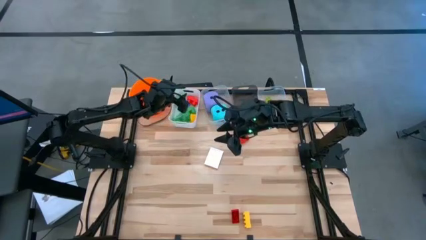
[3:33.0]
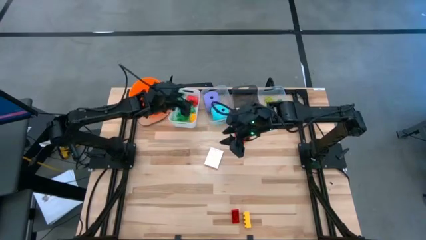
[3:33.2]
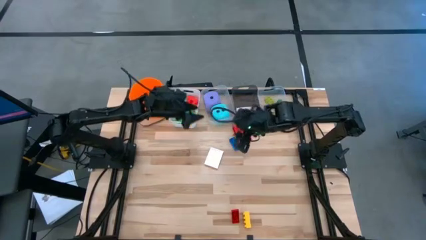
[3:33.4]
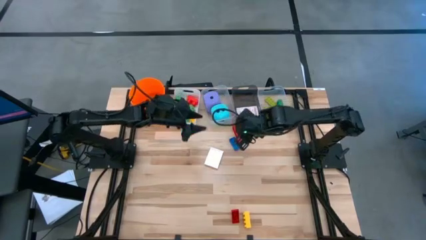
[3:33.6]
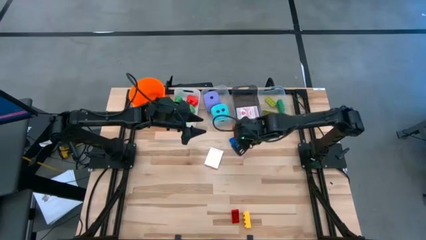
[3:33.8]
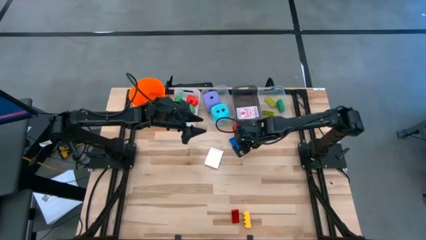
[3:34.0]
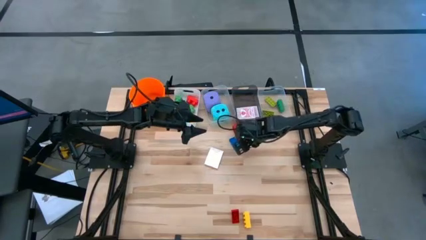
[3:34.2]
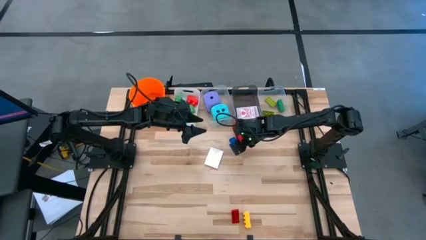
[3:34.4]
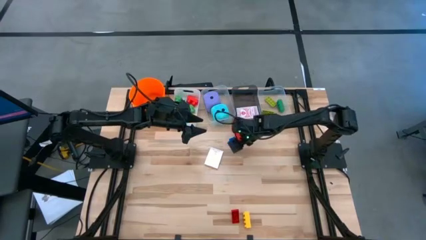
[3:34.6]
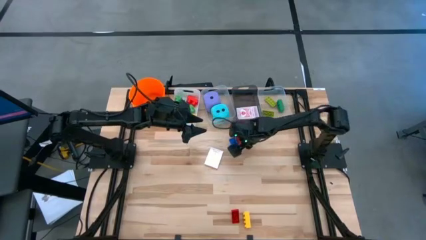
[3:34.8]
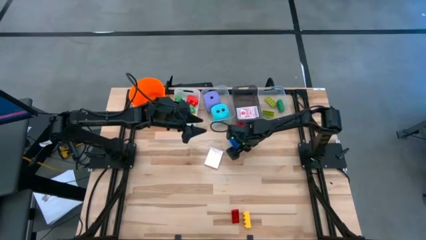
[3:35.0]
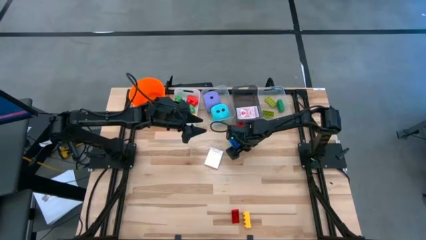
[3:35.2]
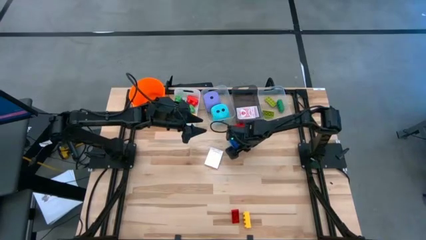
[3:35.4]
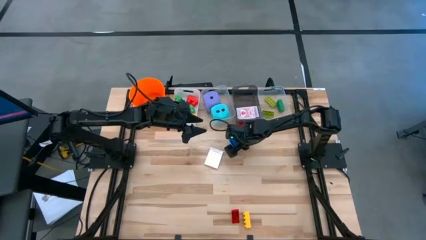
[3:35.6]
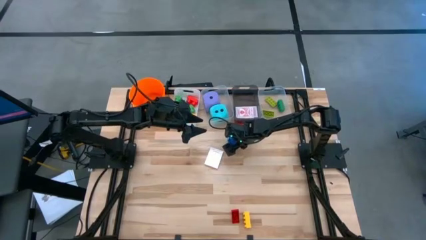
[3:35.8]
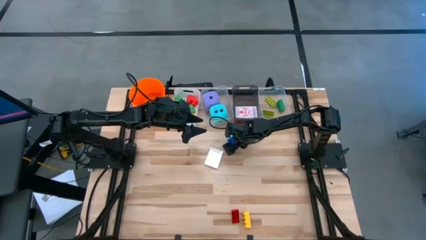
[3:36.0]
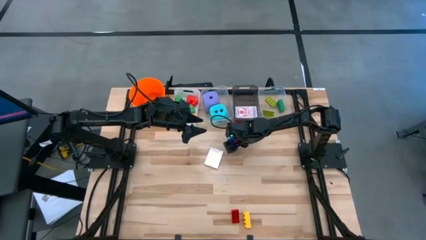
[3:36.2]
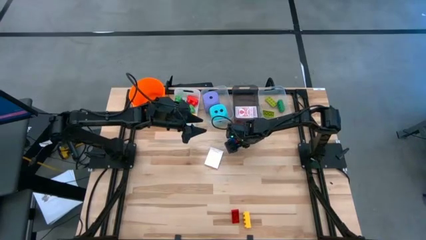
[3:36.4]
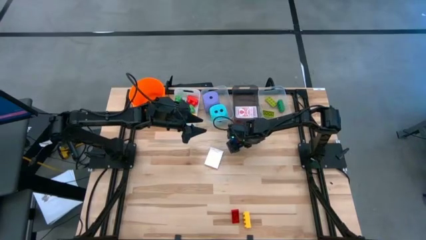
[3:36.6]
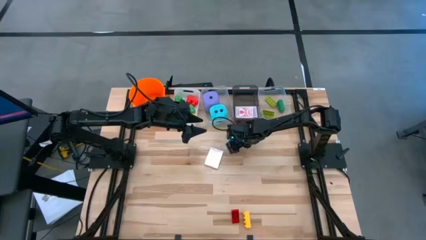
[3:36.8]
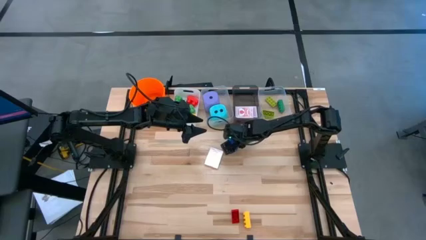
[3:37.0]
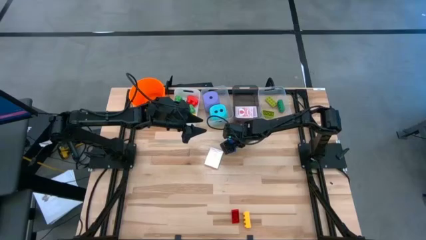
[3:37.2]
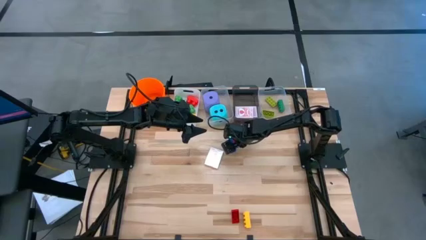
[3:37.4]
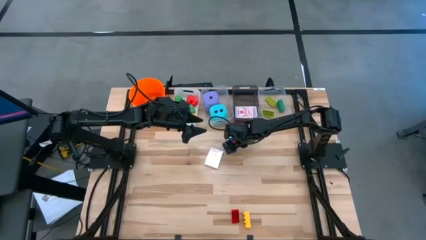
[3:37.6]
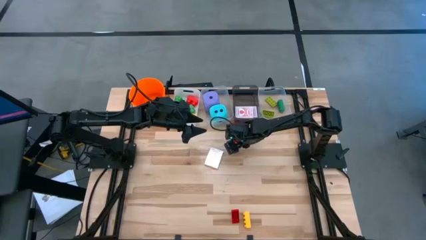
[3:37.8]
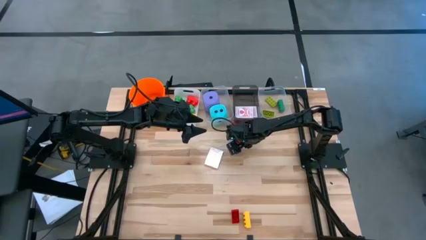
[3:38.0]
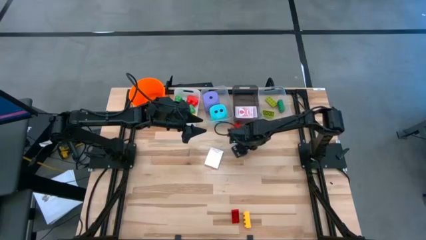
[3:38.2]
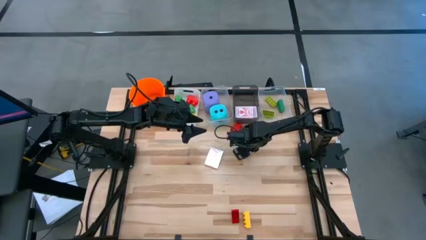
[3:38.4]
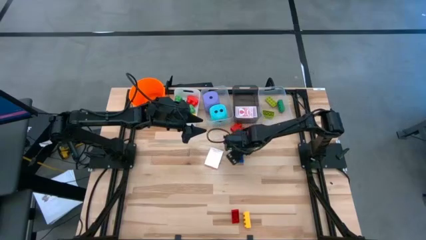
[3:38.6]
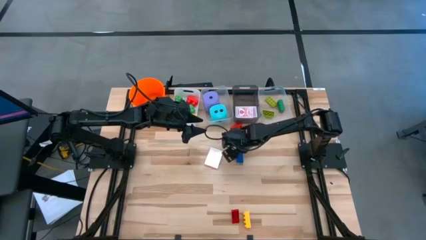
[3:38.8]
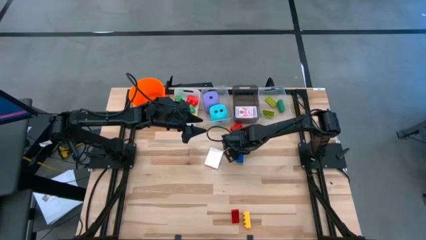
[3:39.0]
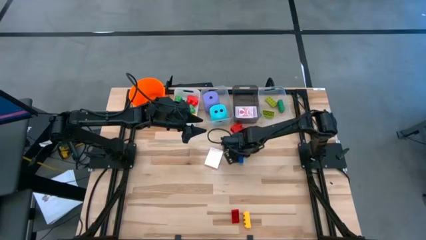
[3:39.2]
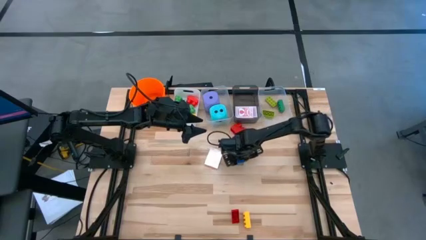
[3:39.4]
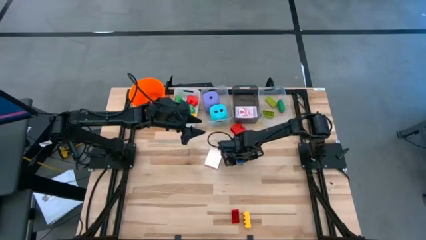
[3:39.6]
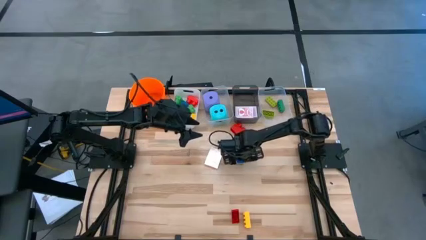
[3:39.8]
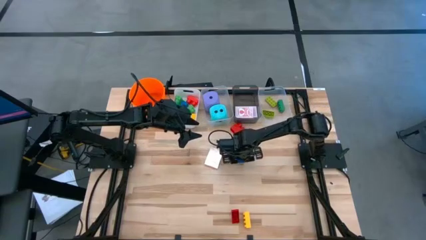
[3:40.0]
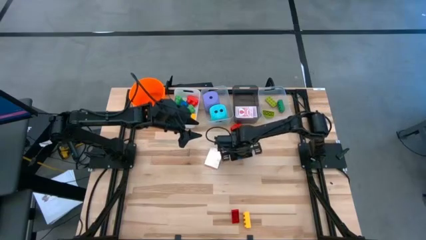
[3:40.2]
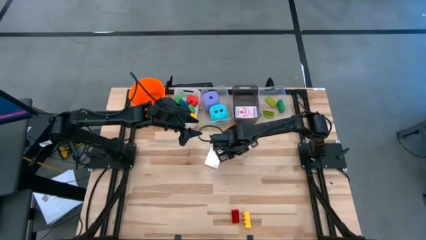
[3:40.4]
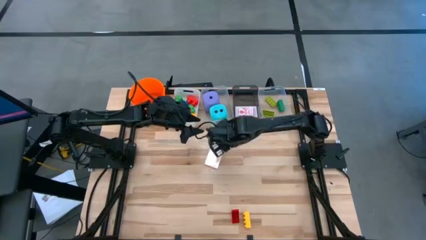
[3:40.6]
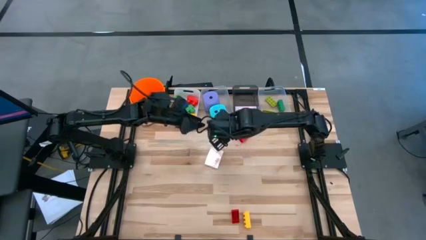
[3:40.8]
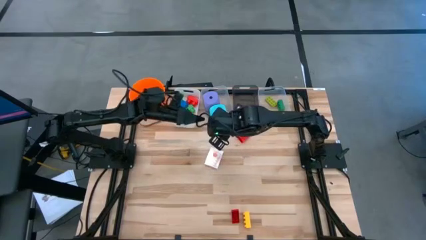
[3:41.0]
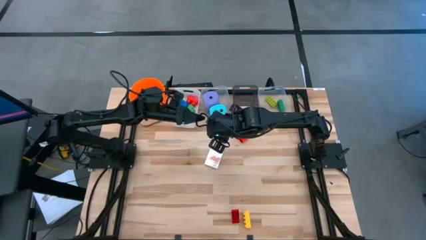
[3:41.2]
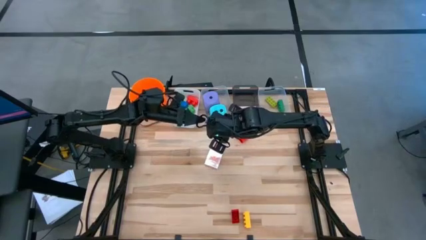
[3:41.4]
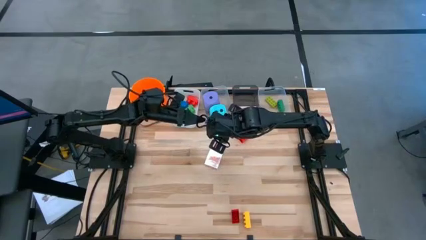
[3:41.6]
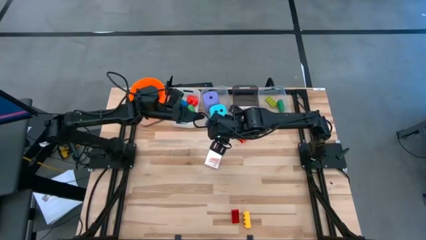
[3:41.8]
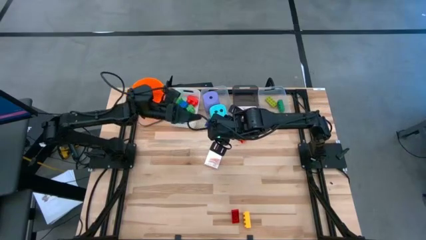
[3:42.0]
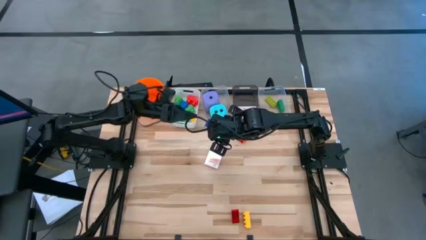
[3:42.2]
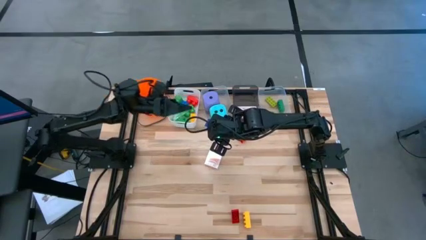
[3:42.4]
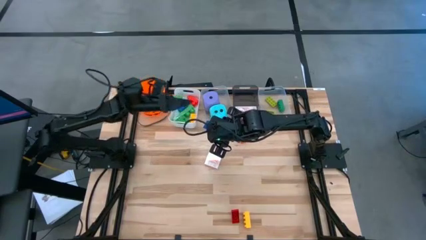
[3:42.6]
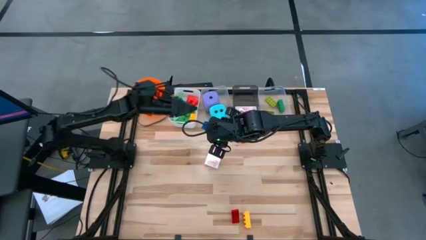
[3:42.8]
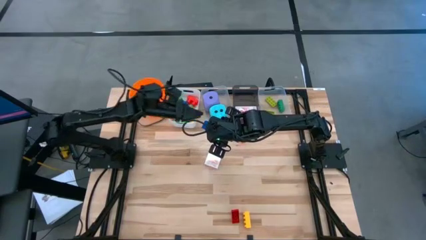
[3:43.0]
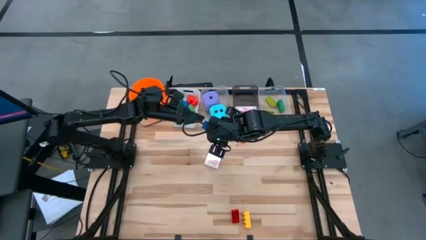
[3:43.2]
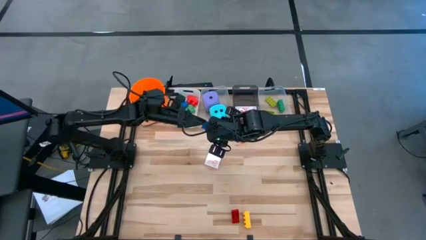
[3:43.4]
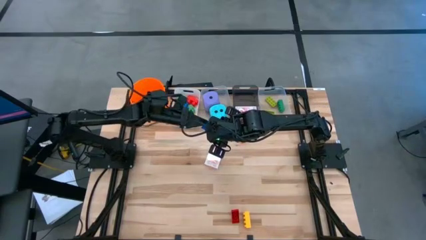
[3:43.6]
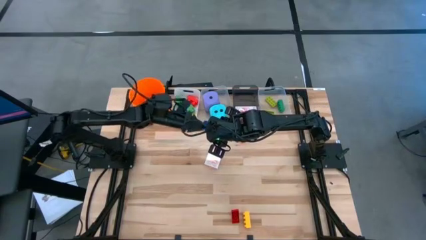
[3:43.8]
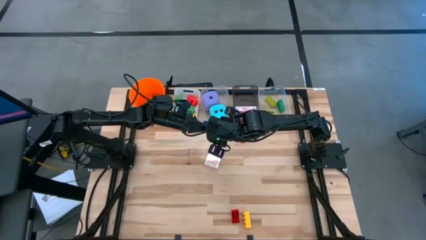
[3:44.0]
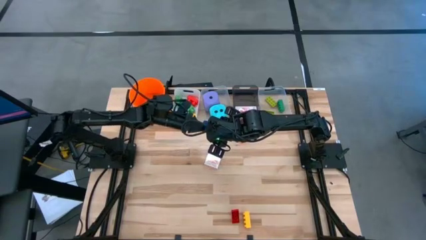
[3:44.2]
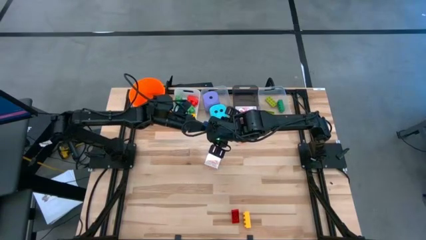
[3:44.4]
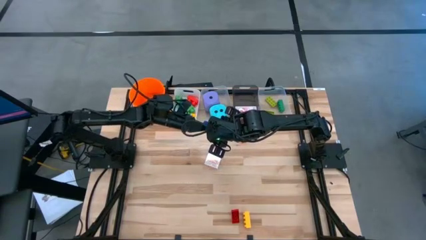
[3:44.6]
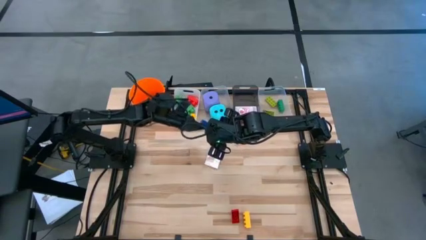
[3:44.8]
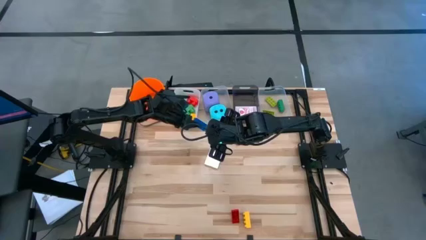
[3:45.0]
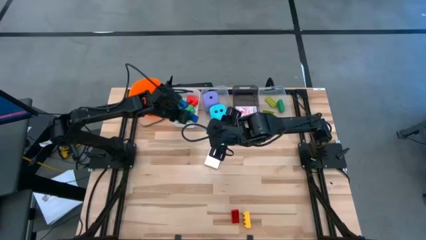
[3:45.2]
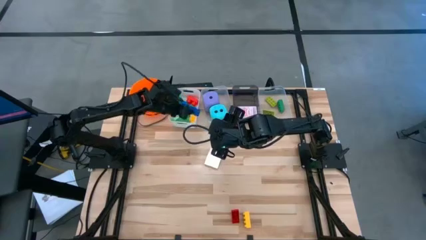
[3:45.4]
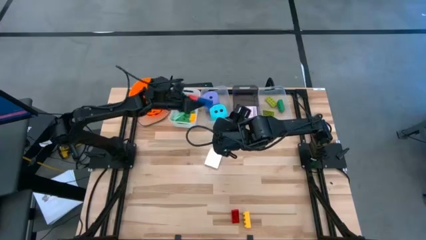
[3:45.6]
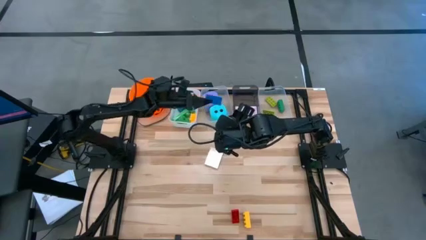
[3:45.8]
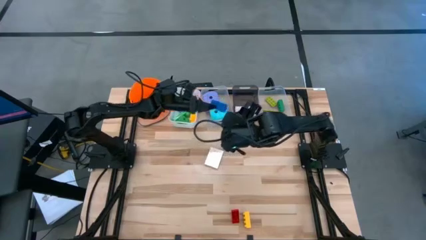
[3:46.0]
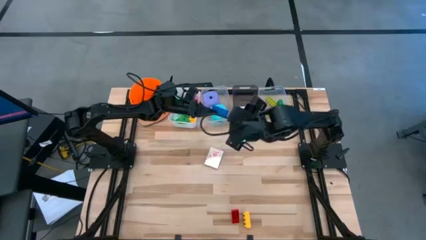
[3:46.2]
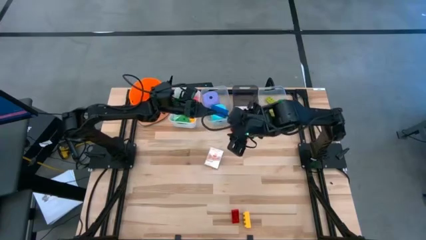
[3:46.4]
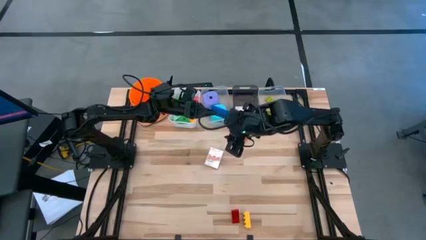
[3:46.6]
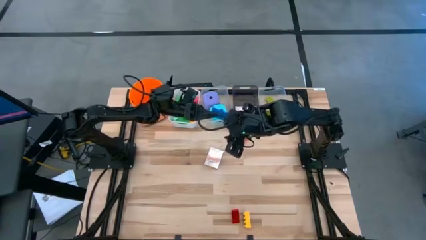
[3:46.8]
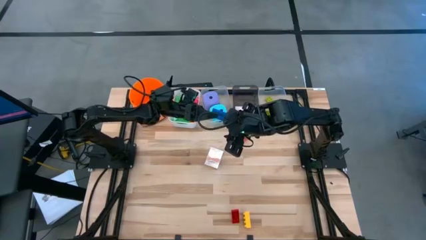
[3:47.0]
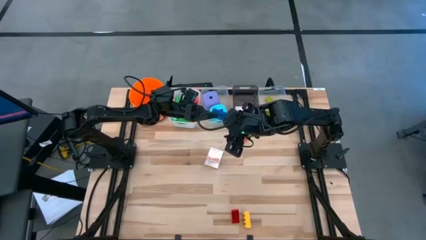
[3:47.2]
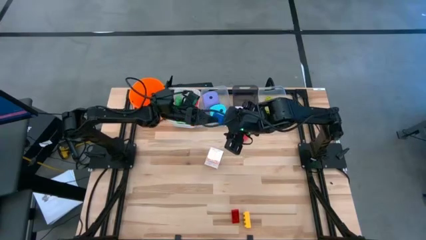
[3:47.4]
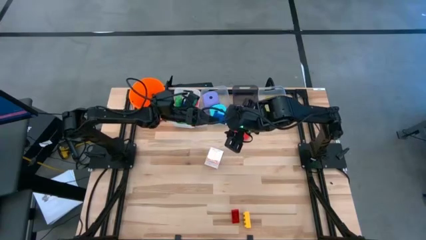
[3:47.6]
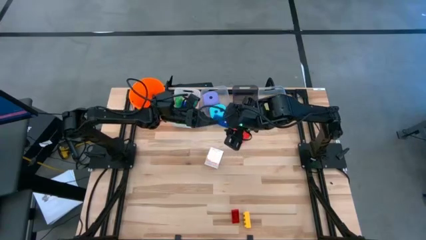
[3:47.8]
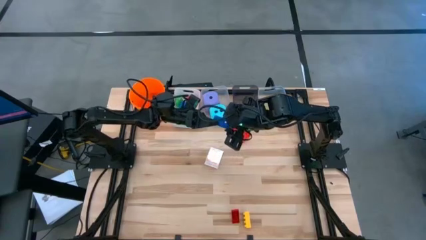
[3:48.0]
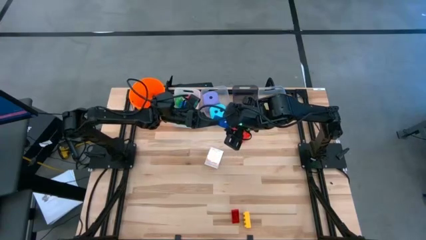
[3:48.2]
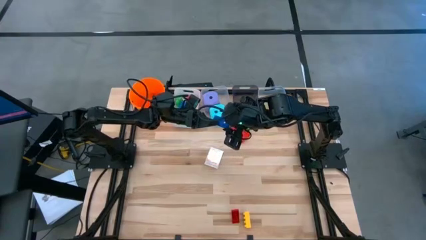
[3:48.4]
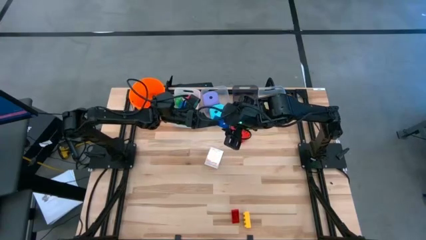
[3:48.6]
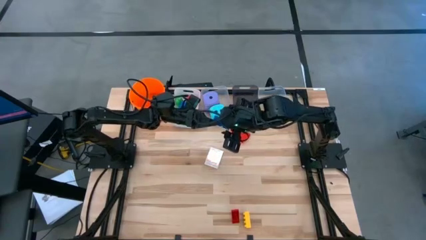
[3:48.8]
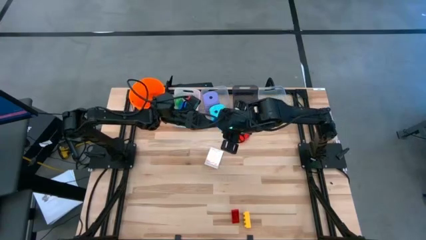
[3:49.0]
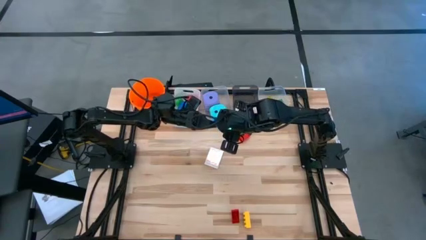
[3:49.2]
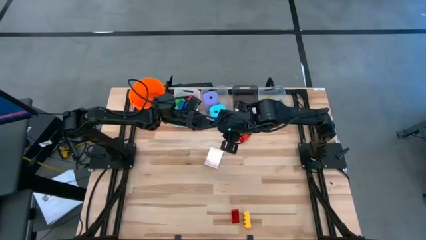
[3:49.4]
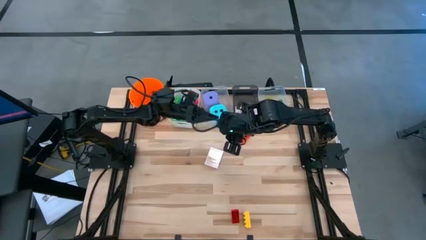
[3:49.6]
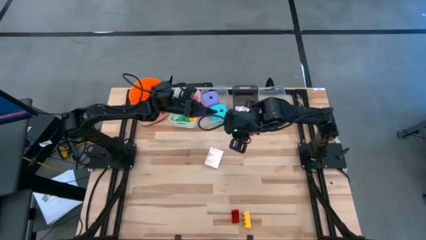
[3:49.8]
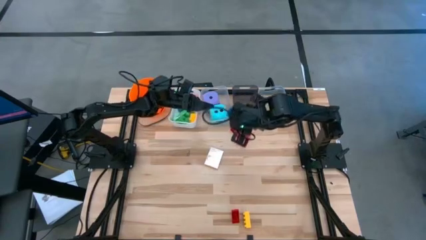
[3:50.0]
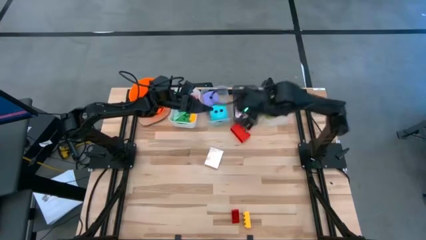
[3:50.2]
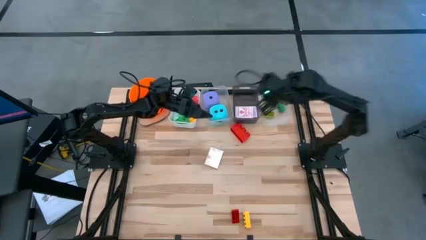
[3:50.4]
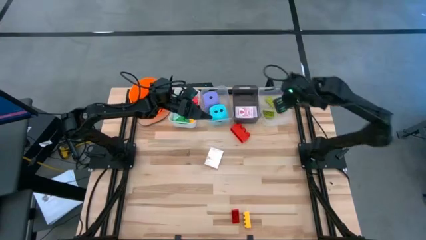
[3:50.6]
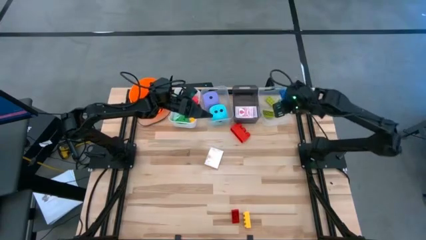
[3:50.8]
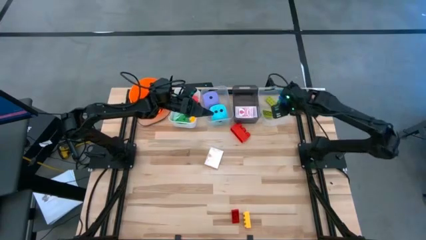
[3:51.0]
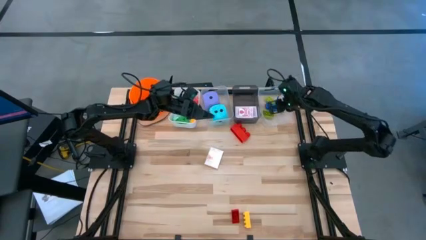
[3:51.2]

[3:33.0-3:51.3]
Task: Pick & Place Toys
Put the blue game piece into the right transparent bin
